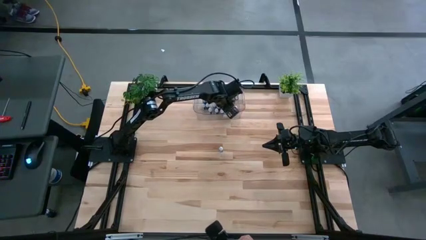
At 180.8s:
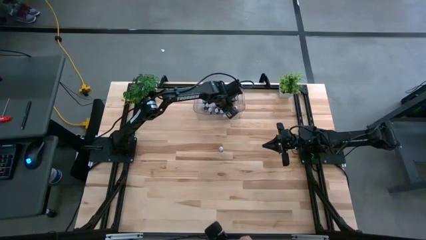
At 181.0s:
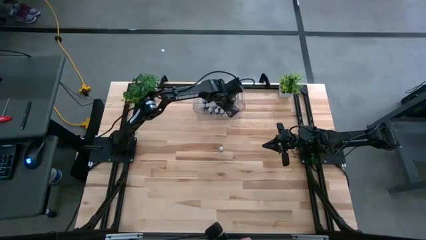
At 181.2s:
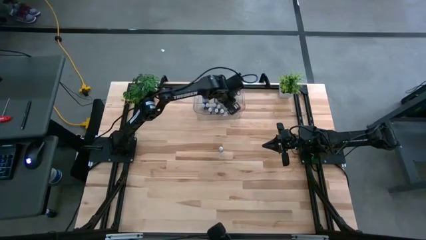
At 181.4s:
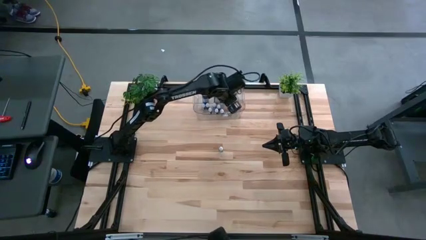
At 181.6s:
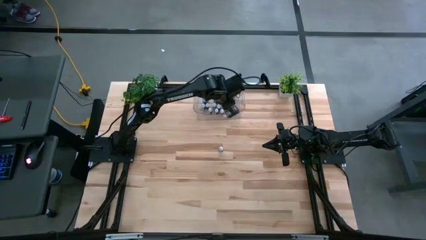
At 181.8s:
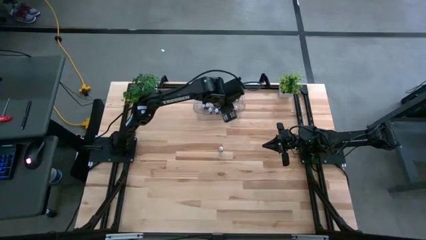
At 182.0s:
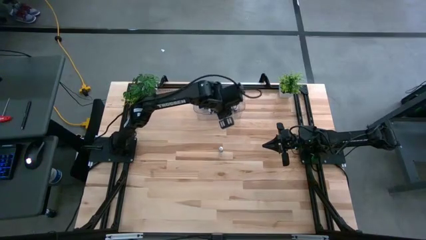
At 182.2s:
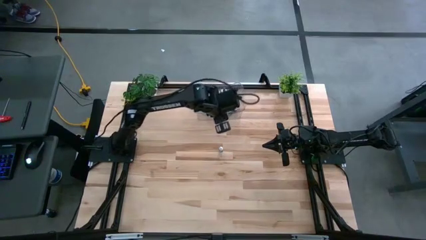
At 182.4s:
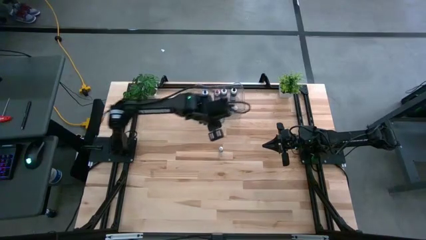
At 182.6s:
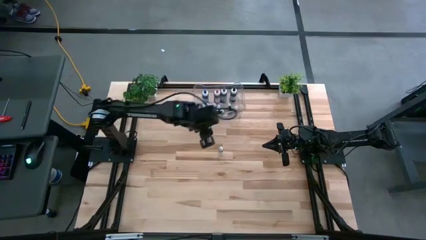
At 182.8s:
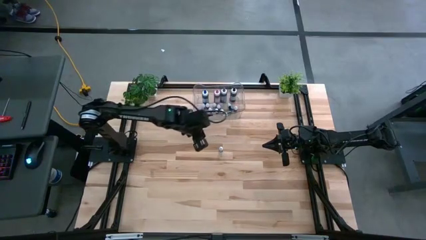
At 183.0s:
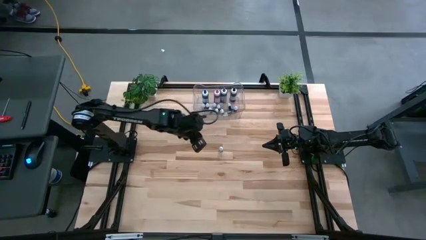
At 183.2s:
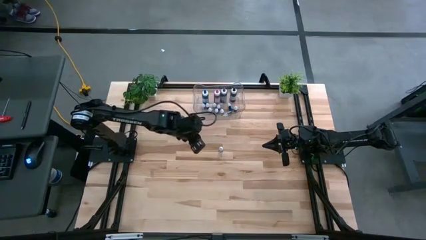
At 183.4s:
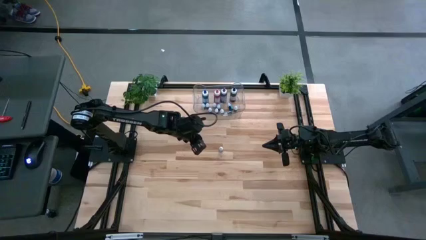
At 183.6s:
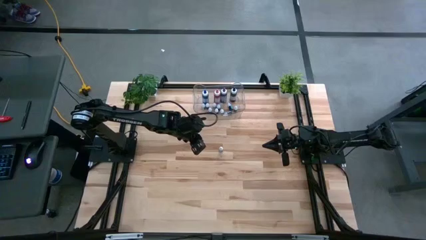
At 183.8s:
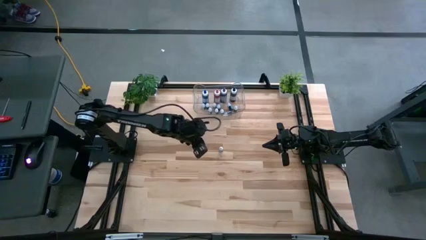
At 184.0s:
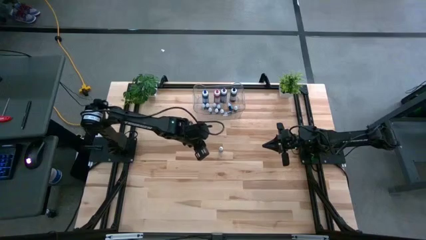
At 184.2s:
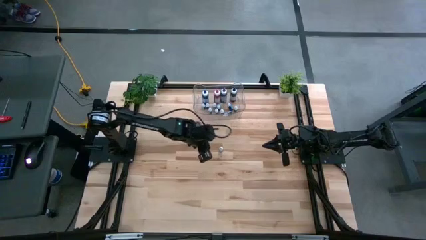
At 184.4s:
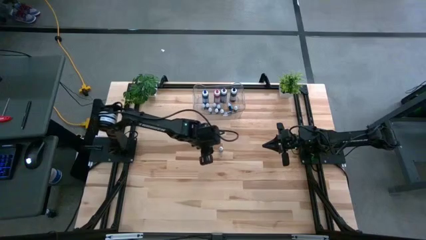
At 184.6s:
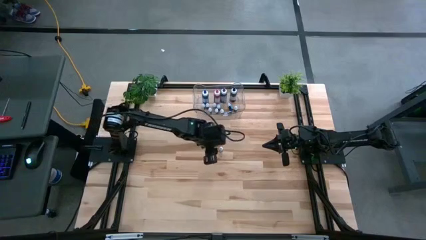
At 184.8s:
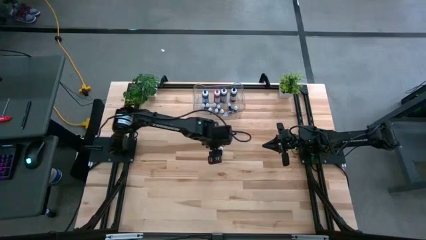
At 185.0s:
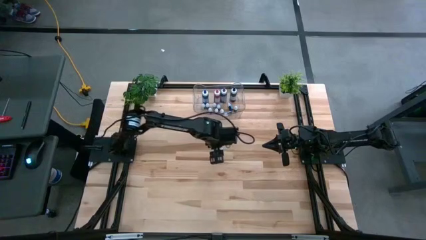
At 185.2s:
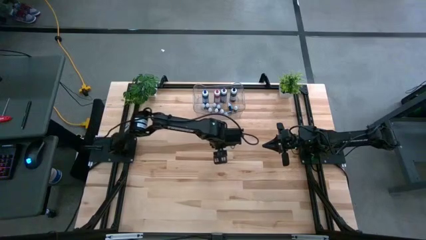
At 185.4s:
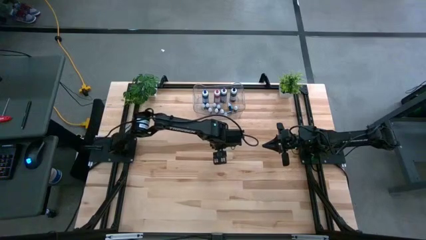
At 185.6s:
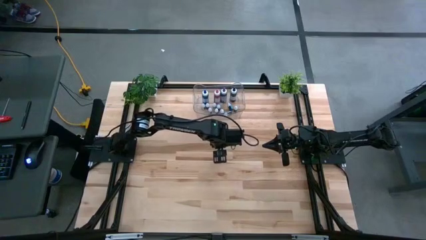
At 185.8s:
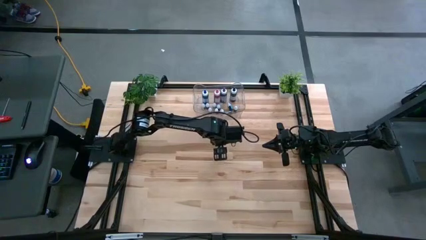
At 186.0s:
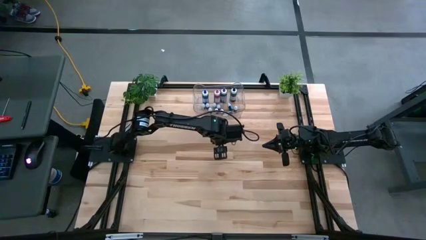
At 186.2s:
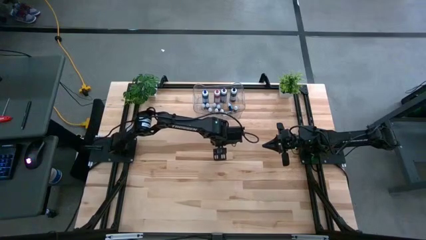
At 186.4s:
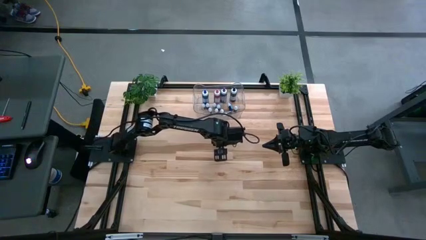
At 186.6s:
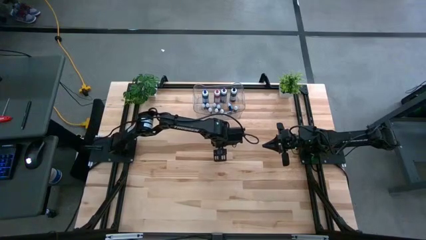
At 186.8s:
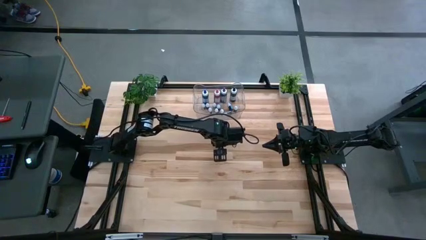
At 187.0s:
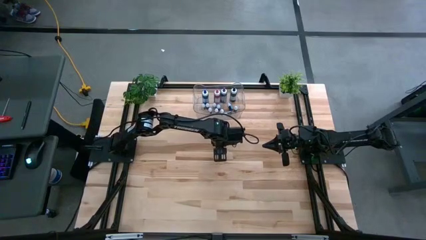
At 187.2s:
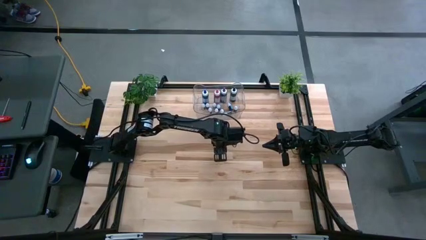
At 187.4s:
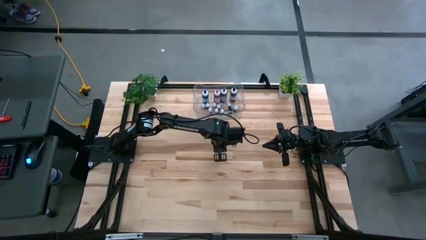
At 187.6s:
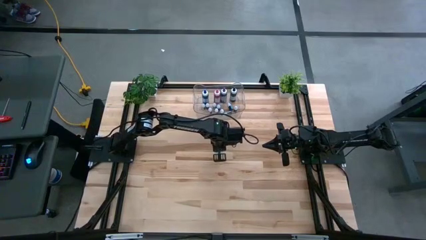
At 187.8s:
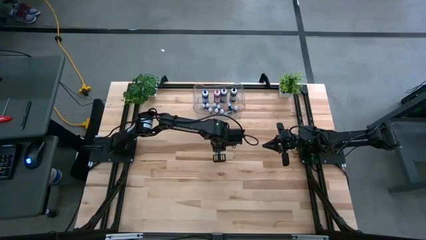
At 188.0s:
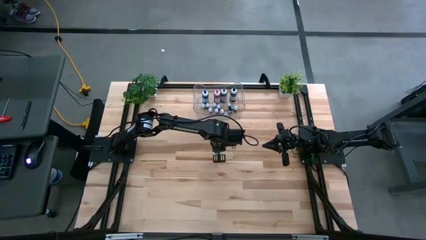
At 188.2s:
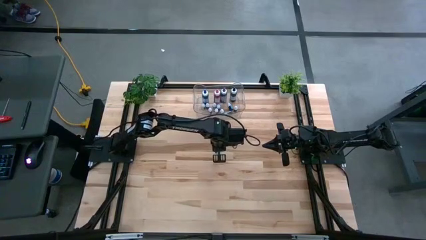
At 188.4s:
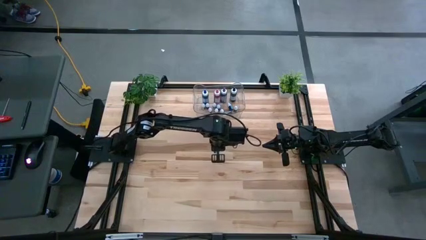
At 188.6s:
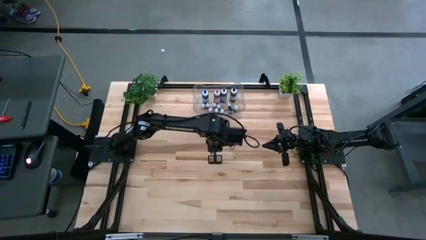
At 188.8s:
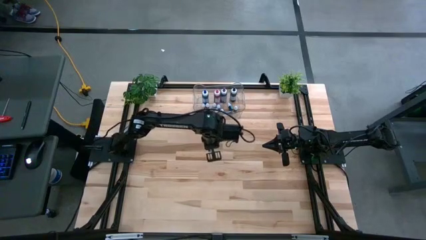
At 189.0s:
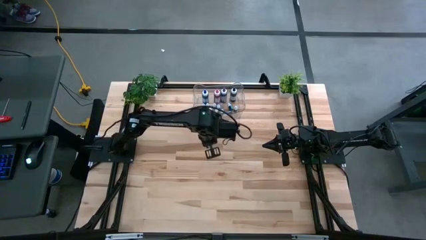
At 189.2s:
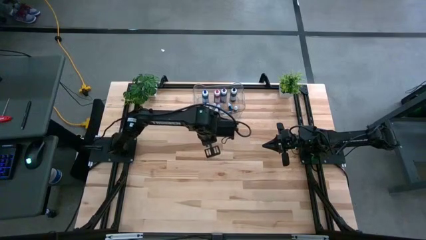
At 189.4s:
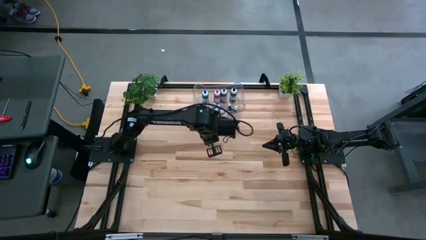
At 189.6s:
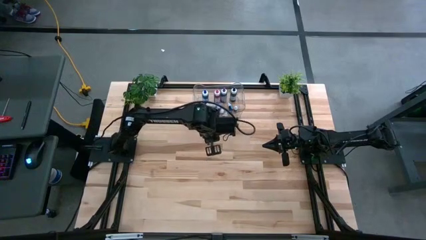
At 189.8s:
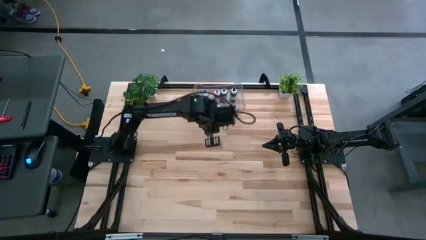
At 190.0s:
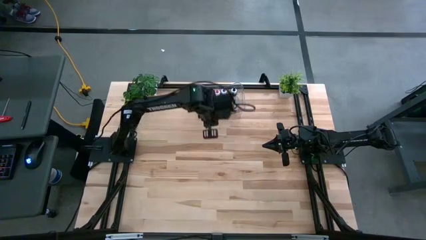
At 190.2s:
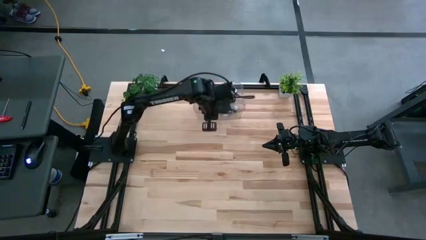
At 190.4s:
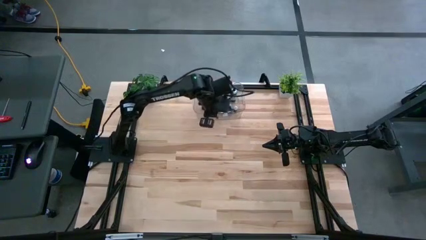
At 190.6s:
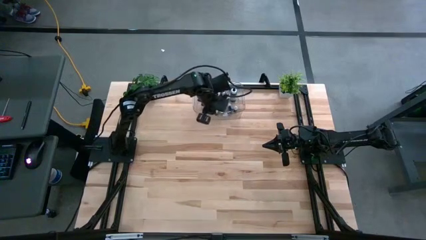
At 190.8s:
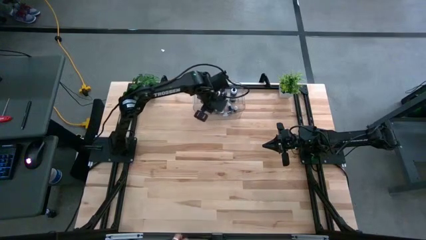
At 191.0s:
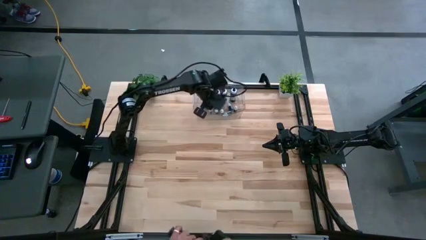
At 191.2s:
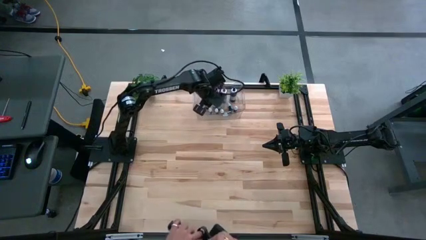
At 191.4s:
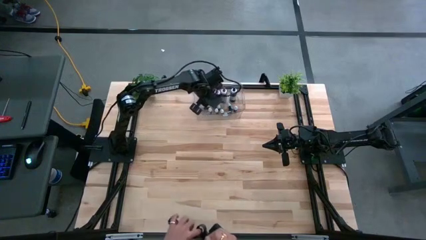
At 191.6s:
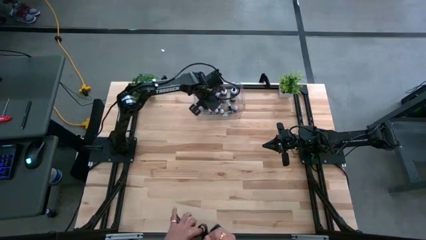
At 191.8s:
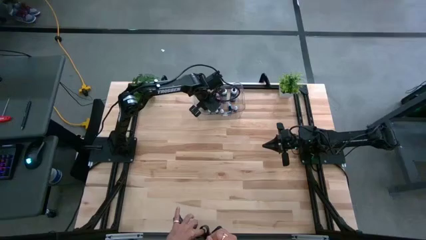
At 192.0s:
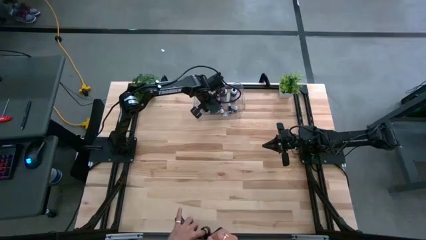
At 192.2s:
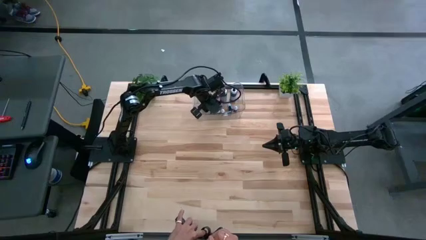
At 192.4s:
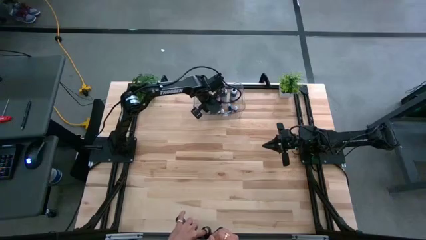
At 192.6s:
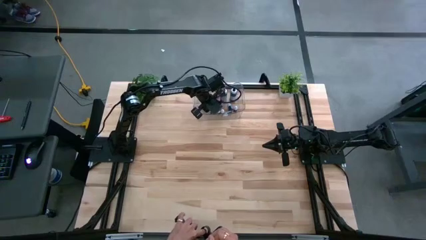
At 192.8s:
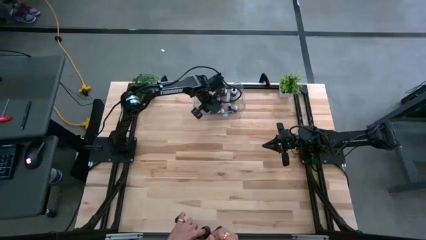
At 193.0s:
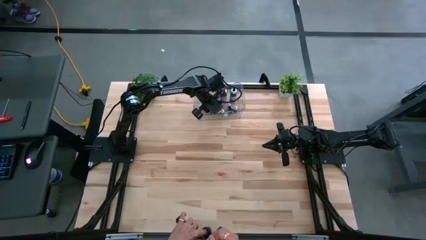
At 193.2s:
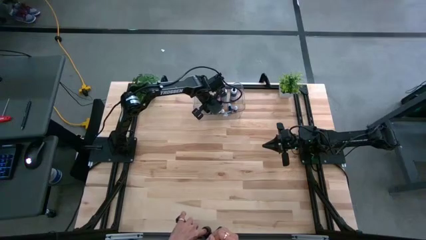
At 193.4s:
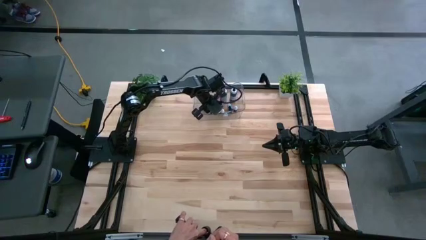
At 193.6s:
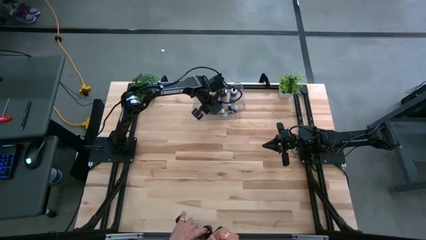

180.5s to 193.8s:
Task: Pick & Place food coloring
Put the small purple food coloring bottle into the transparent bin

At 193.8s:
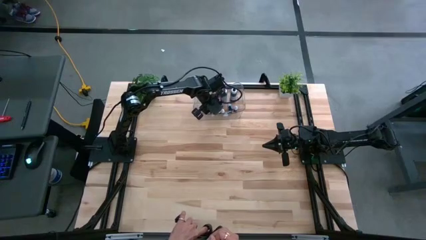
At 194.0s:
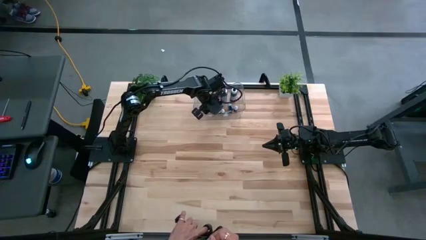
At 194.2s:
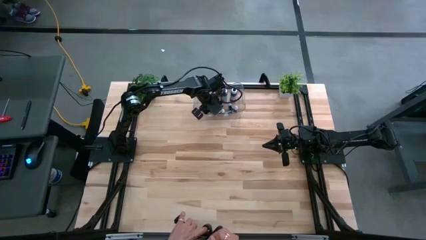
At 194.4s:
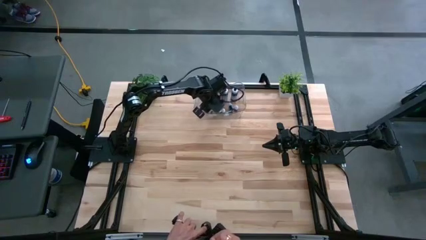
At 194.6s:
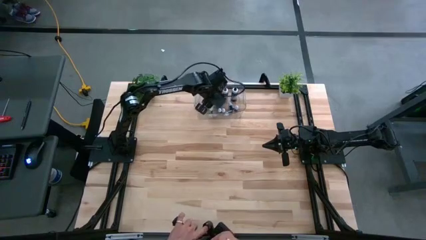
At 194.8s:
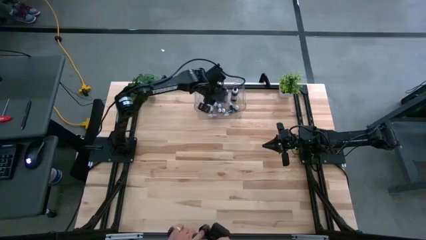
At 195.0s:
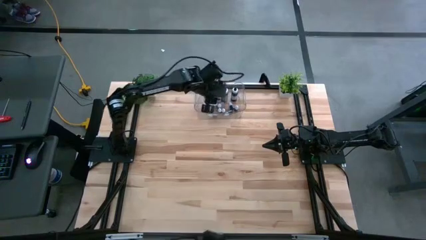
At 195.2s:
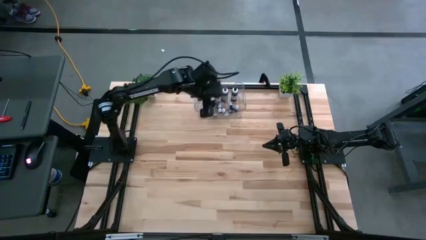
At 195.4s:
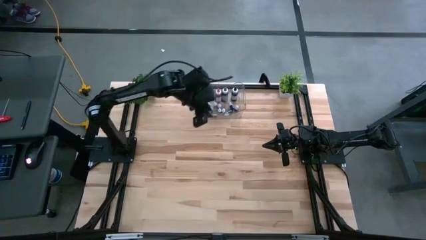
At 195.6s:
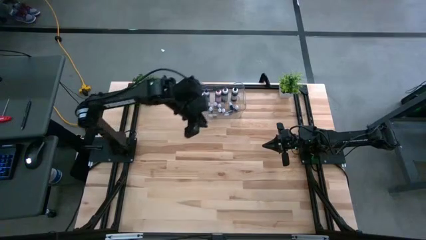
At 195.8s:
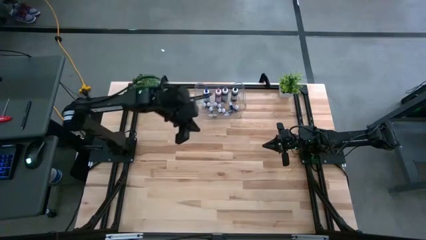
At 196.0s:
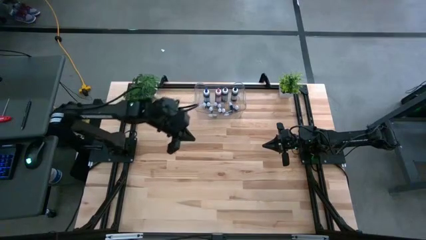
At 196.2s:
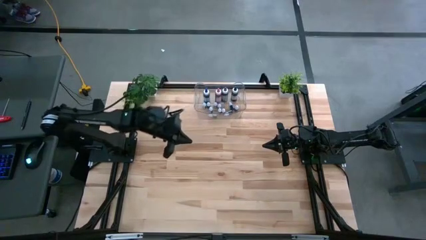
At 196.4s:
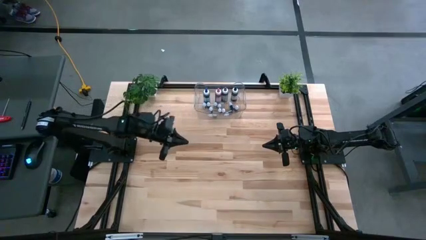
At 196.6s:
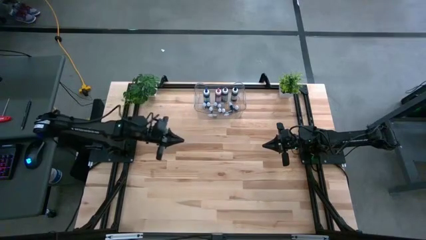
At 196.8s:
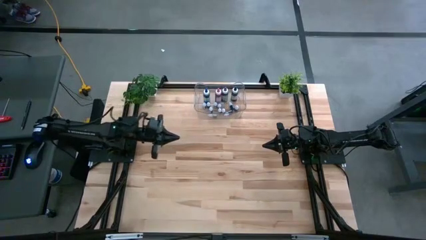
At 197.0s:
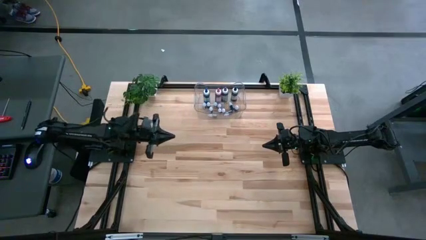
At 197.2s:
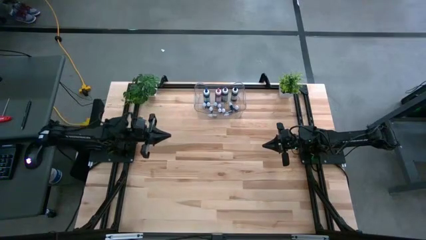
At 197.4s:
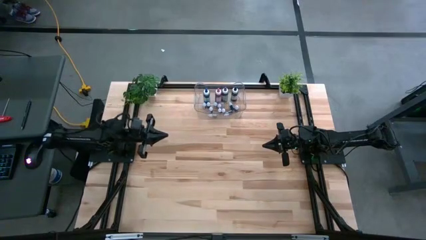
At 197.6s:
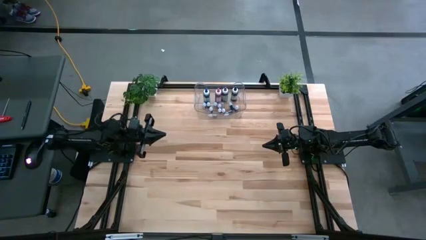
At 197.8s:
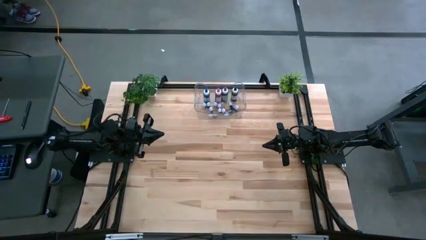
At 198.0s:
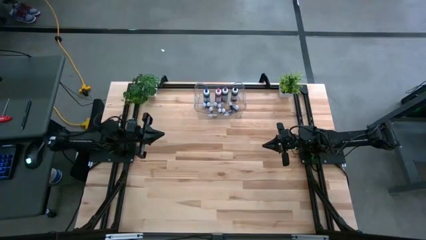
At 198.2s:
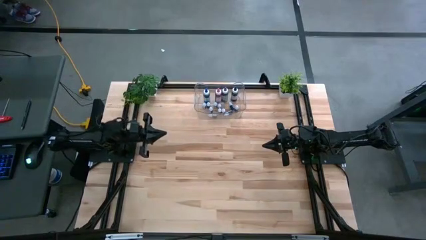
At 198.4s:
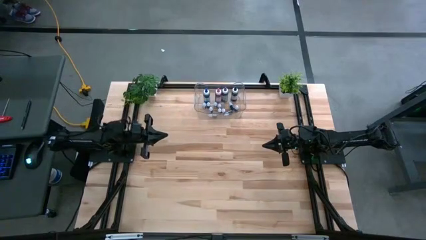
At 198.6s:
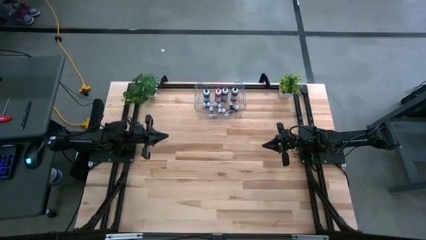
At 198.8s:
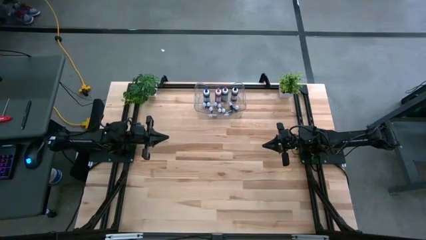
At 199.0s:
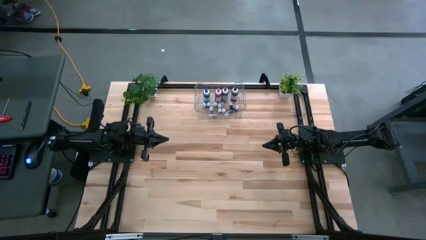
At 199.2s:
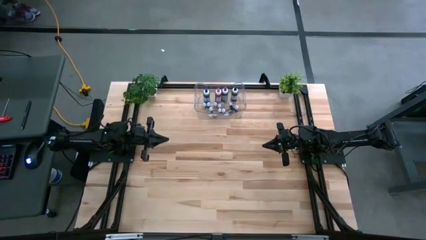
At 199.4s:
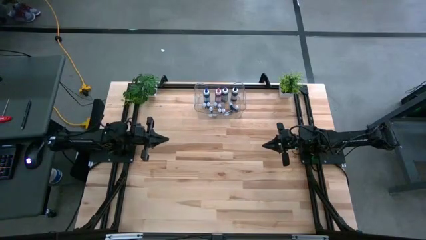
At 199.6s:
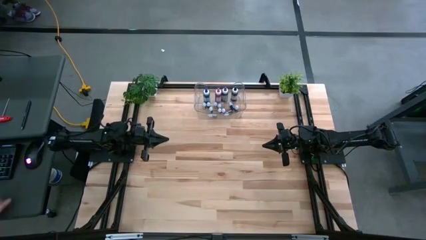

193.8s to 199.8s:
Return to Home Position
